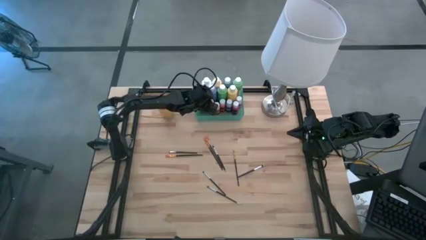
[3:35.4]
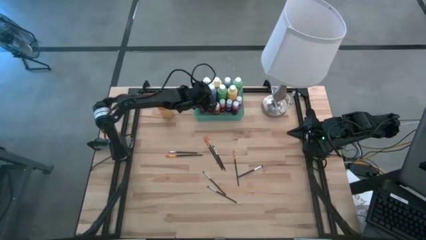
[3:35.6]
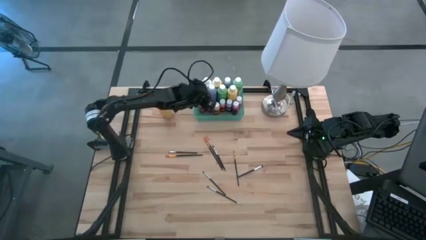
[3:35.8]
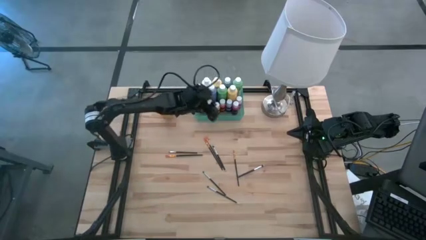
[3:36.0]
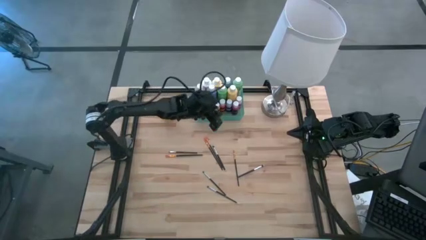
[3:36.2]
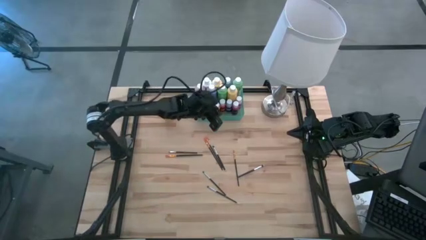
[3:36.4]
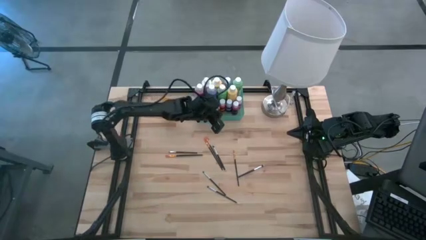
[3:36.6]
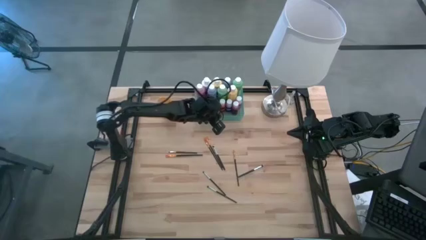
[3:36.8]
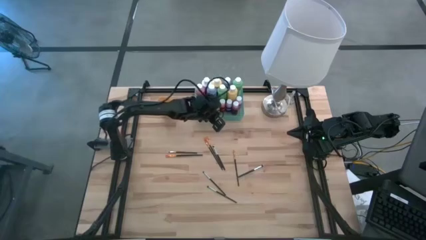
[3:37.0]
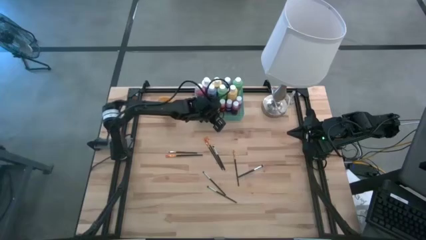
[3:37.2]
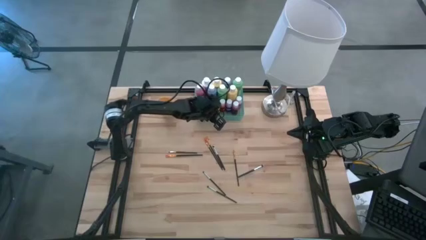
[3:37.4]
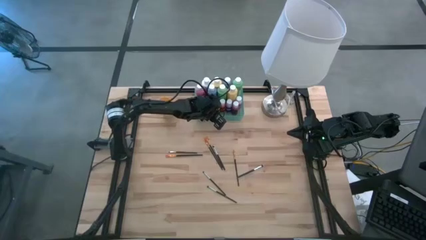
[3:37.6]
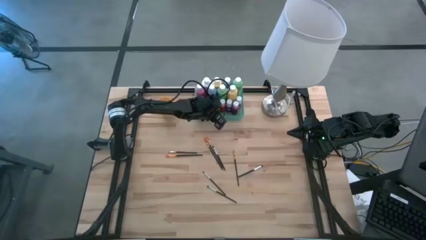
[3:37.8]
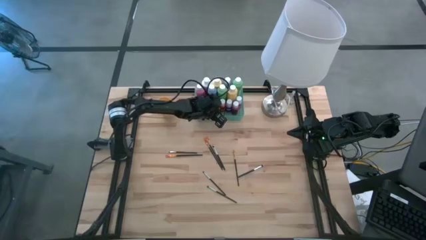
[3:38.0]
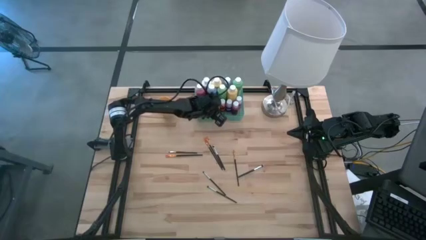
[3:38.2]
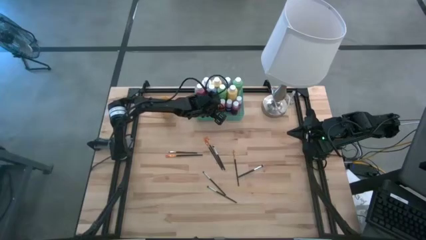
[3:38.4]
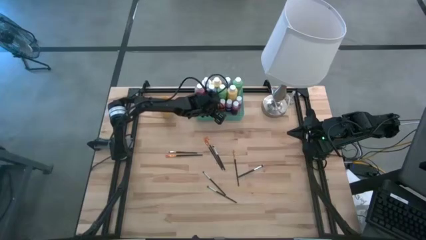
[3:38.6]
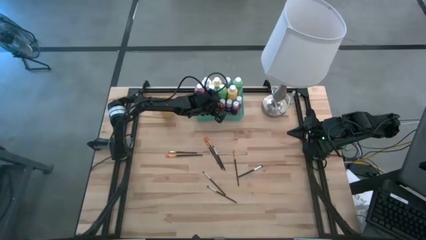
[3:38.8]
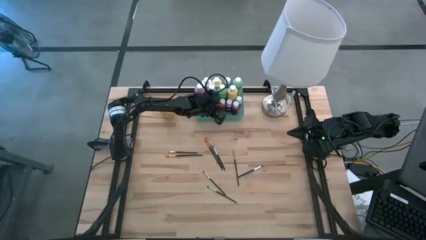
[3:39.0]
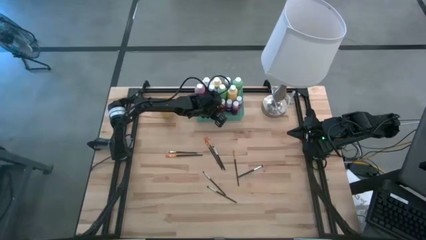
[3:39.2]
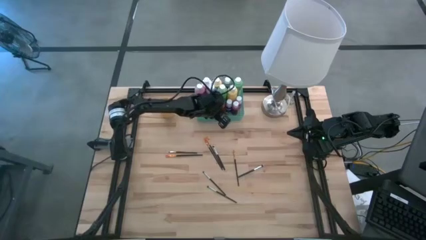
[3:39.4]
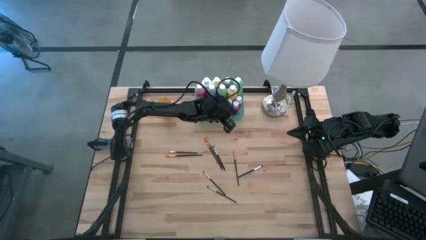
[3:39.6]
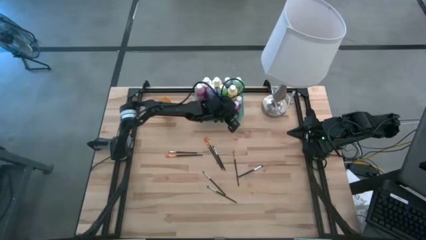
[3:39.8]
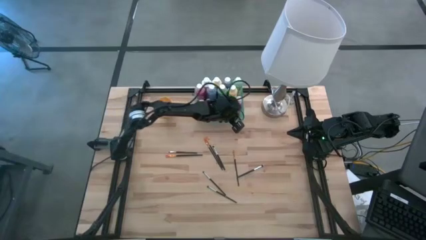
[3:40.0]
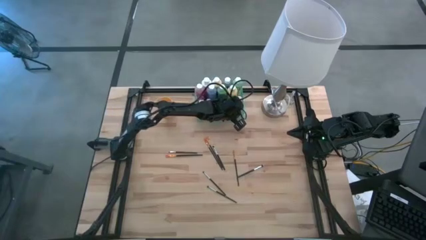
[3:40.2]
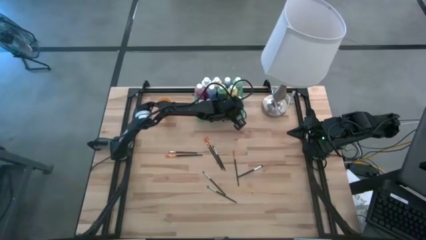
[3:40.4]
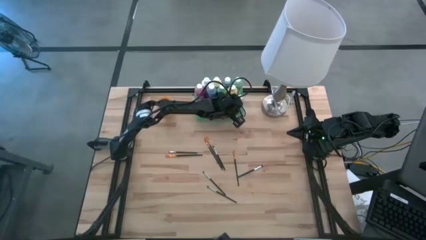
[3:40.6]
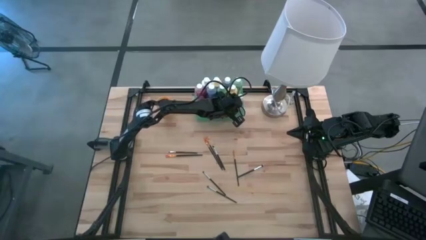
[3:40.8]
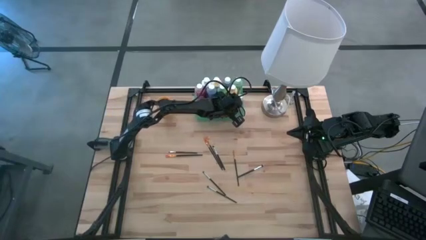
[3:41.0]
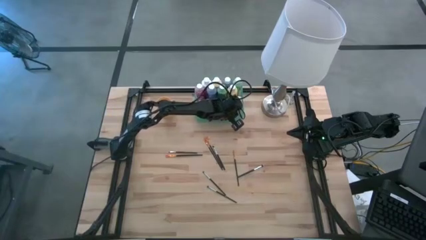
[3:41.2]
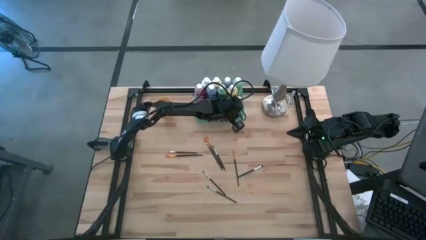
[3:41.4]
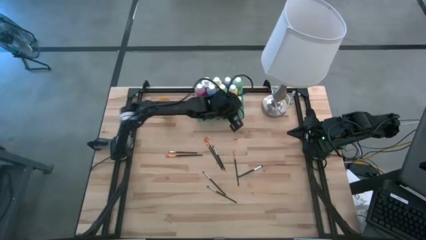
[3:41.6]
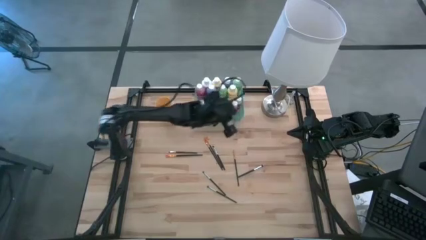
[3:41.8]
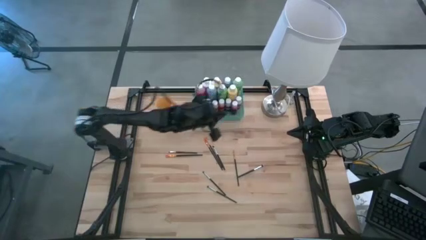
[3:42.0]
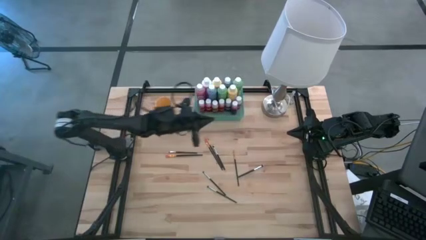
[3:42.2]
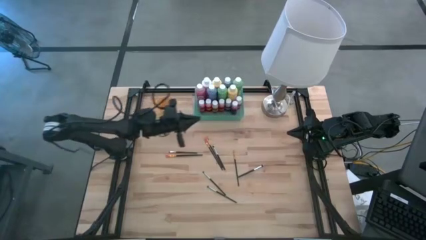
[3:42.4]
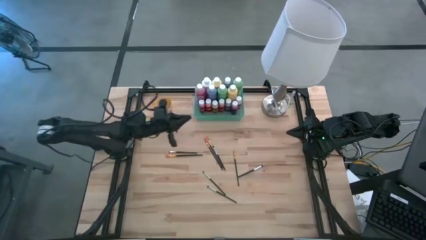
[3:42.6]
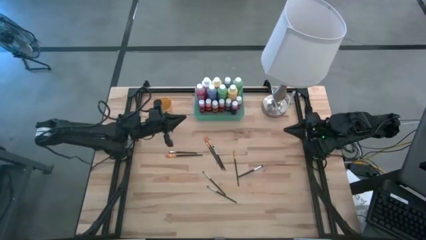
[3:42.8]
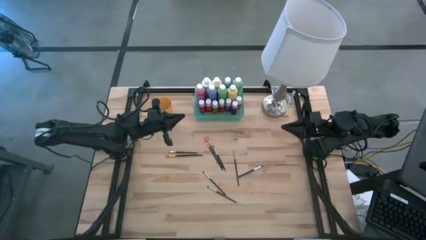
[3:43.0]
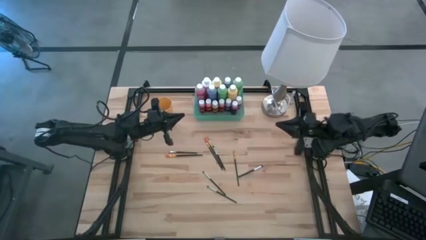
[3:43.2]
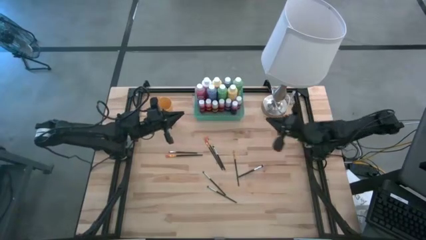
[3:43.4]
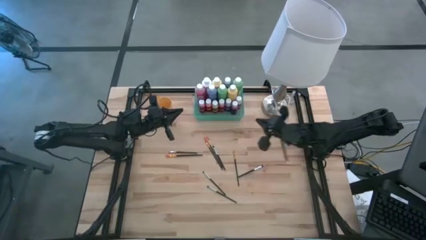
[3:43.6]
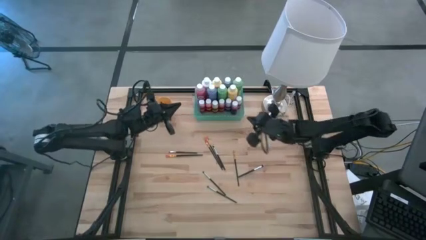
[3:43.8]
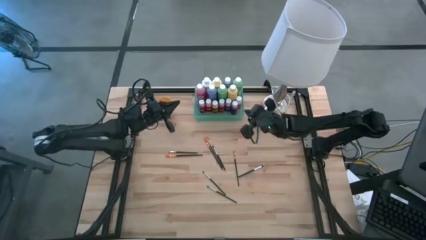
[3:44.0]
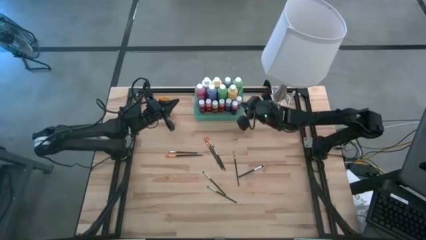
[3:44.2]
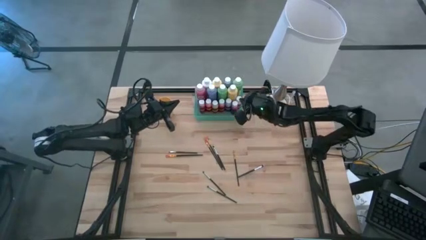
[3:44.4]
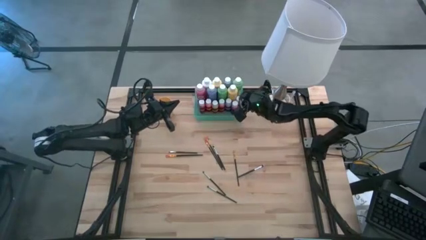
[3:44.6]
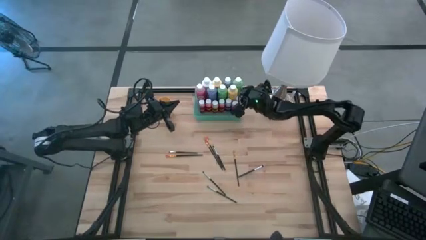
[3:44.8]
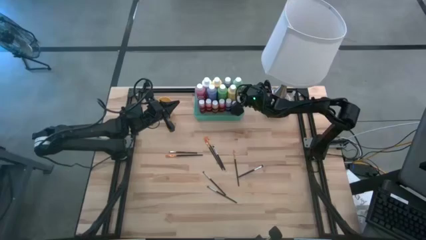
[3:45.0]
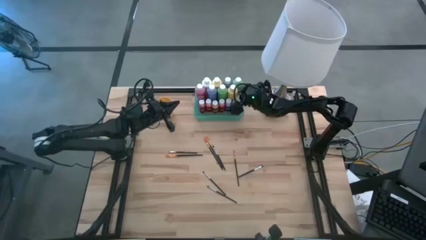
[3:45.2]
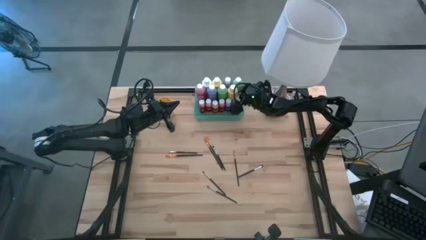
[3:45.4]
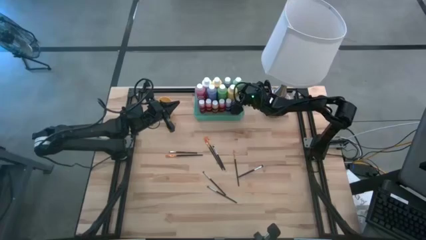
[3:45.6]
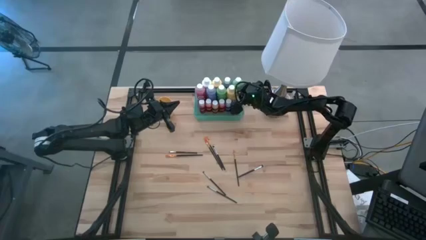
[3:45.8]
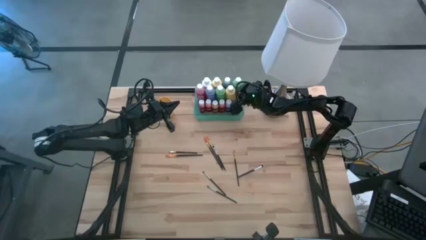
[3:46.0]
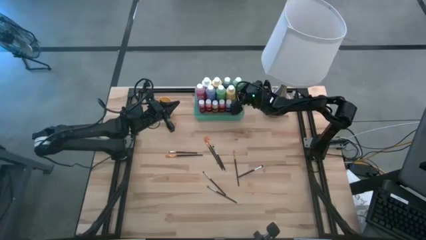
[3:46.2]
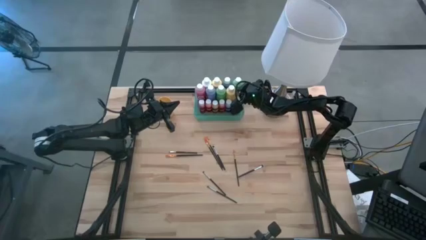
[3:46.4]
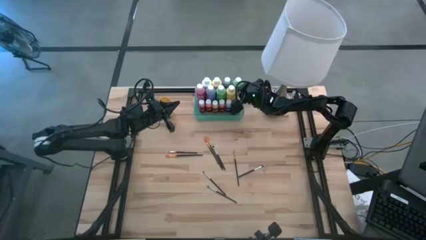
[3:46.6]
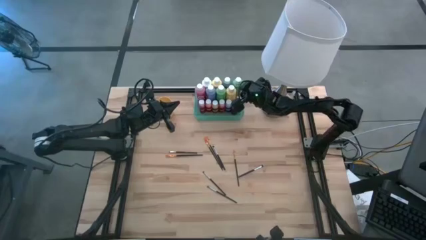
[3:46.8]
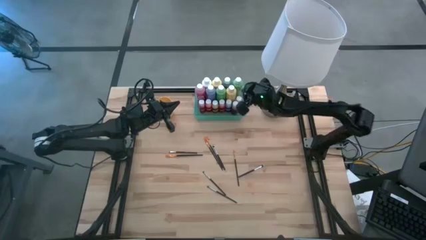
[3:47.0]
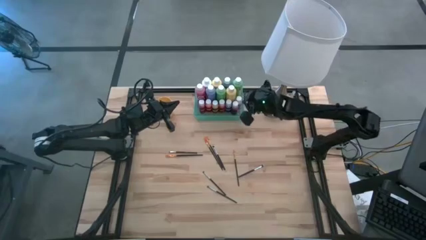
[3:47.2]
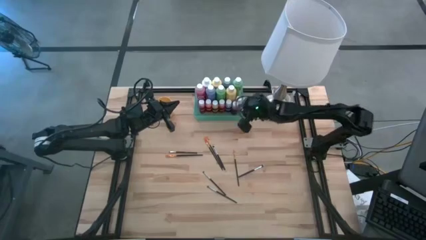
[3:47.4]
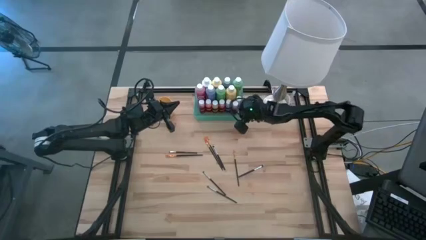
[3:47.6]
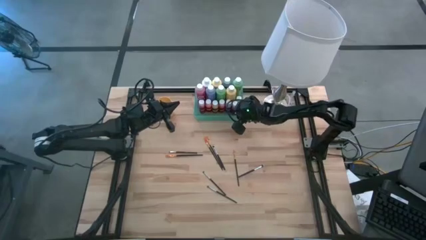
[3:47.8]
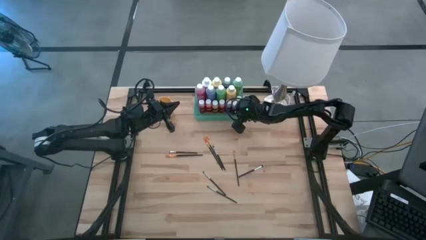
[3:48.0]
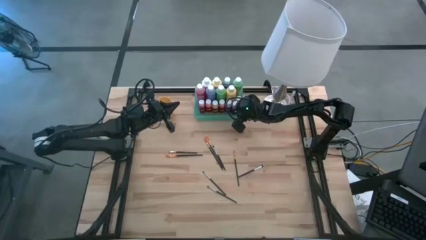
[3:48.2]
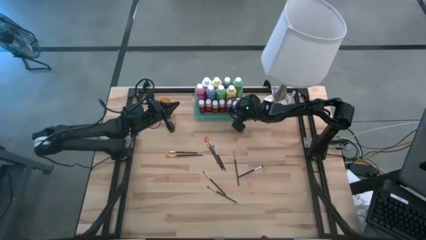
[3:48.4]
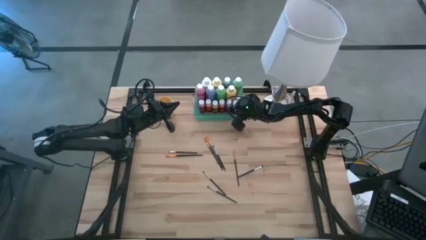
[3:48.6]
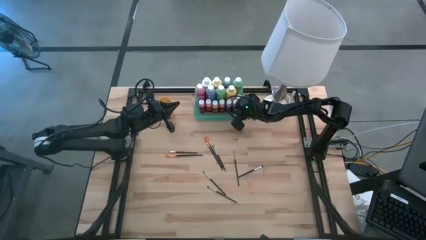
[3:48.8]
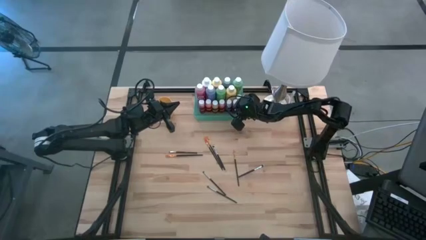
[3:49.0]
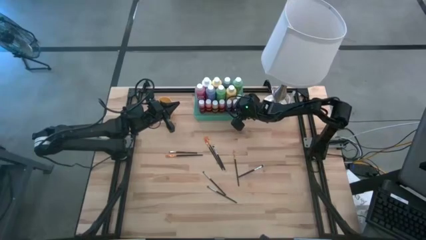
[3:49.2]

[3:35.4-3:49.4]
Task: Pick & Place Paint Supplies
Adjust the paint bottles in the green bin

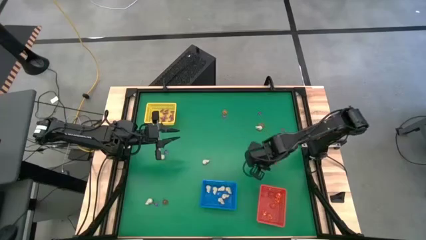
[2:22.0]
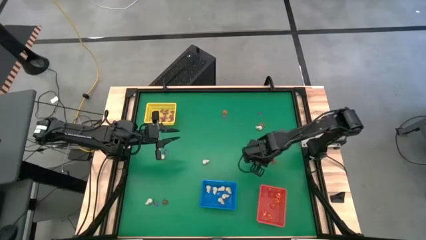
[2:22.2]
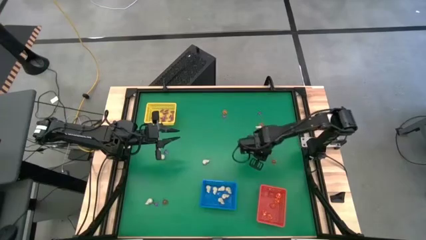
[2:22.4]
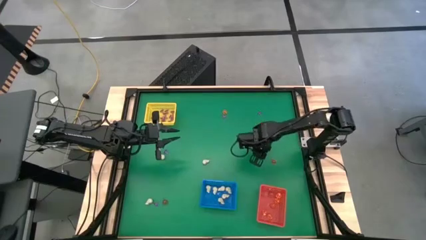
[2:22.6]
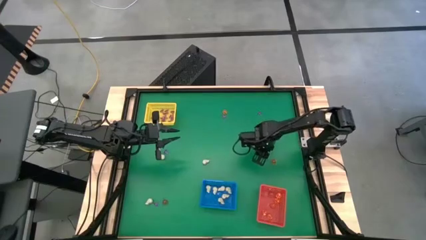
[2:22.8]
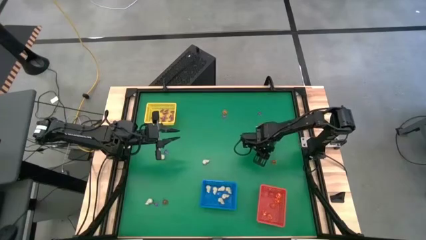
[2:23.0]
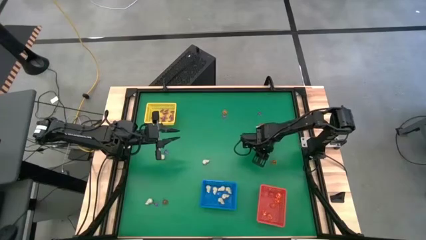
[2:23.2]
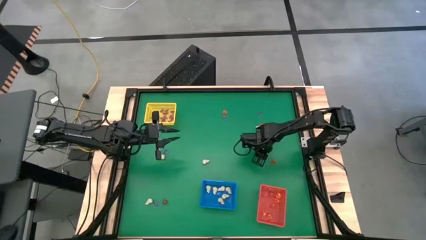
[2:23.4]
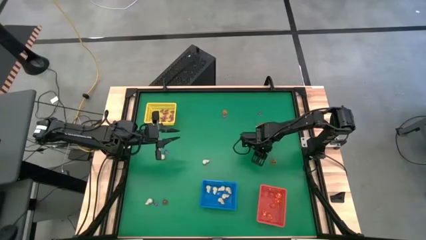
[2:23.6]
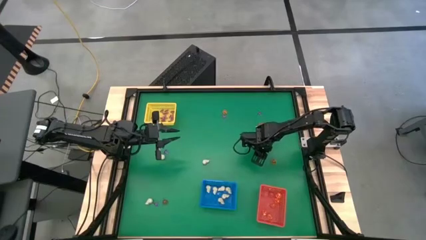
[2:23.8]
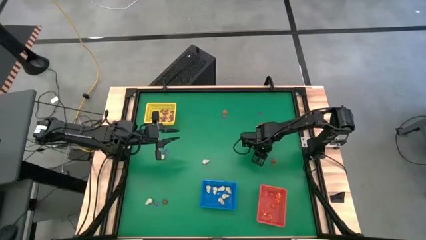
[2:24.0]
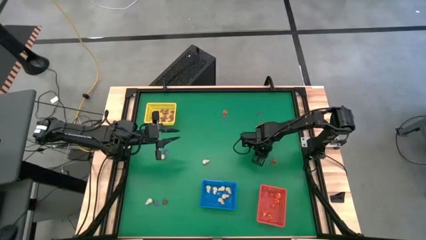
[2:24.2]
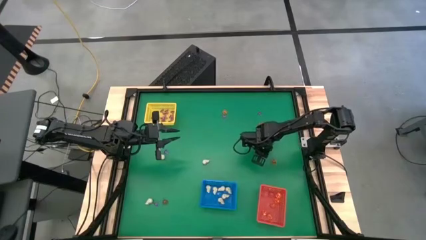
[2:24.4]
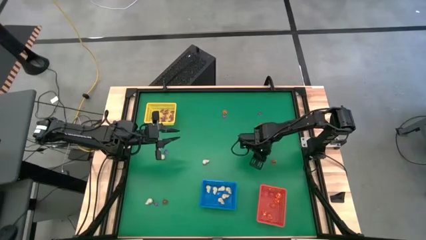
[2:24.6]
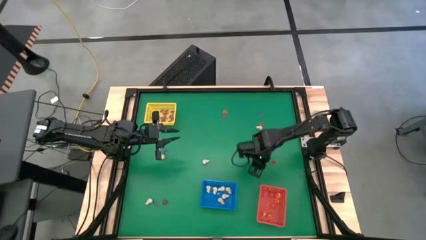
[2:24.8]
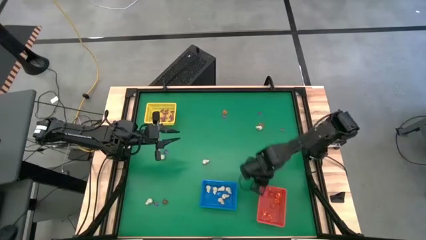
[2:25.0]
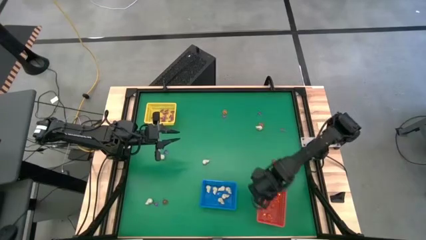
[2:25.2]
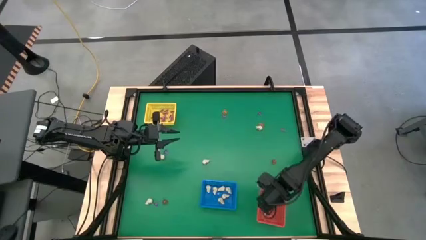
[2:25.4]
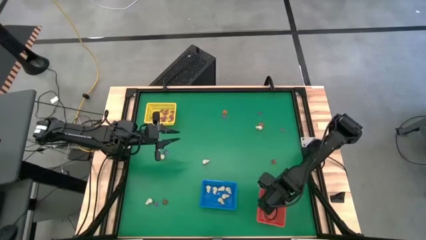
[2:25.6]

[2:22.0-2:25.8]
Task: Sort Halloween decoration
Put the orange pumpkin toy into the orange basket
